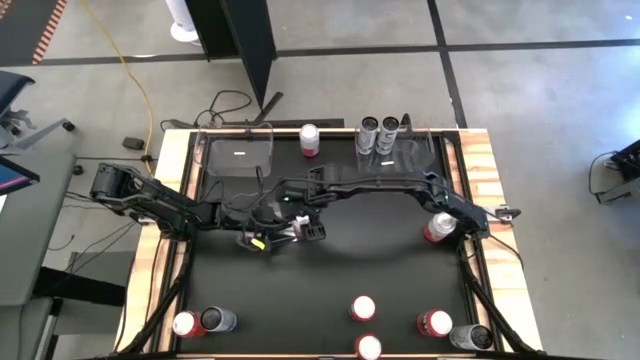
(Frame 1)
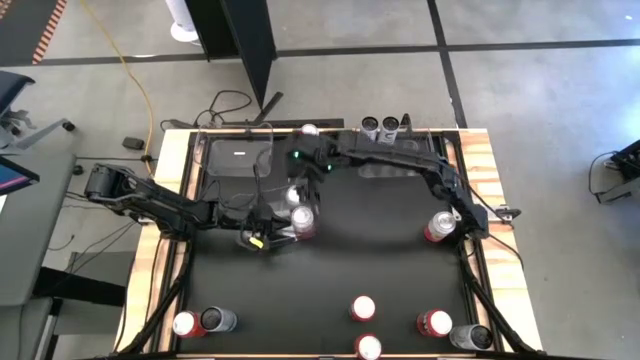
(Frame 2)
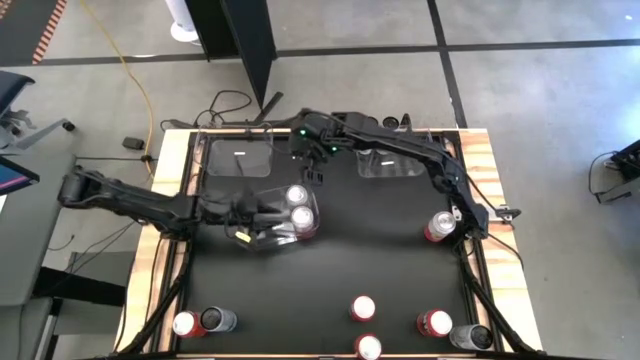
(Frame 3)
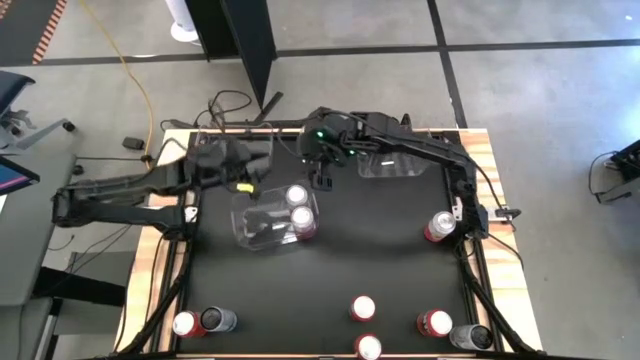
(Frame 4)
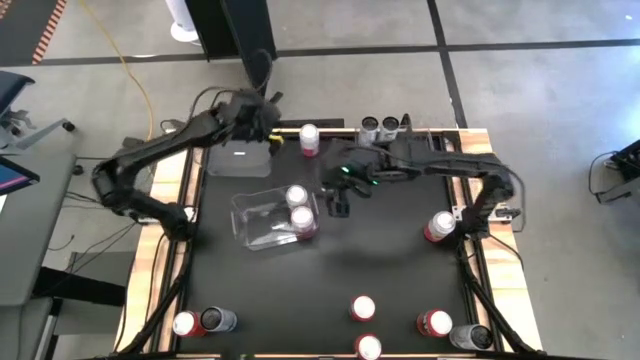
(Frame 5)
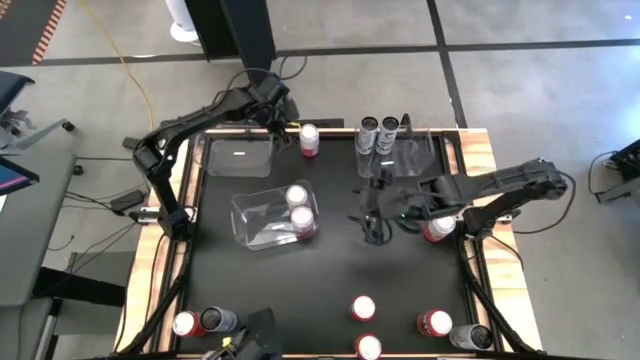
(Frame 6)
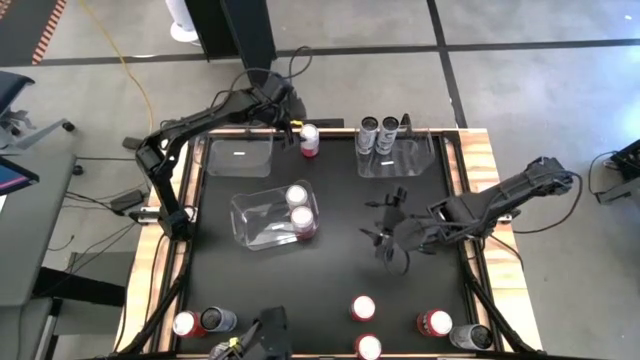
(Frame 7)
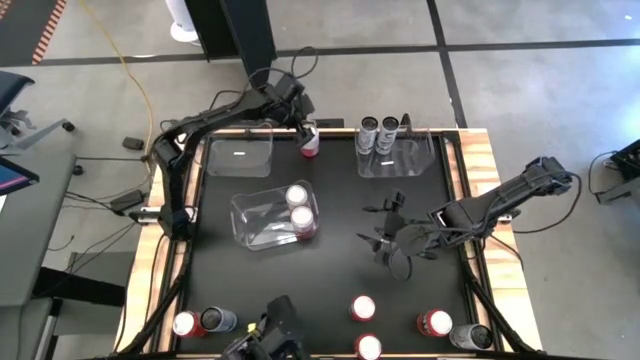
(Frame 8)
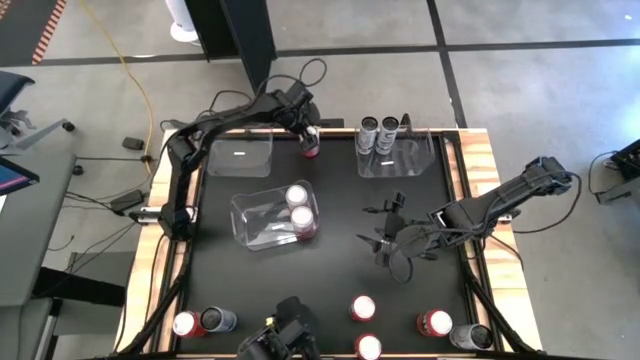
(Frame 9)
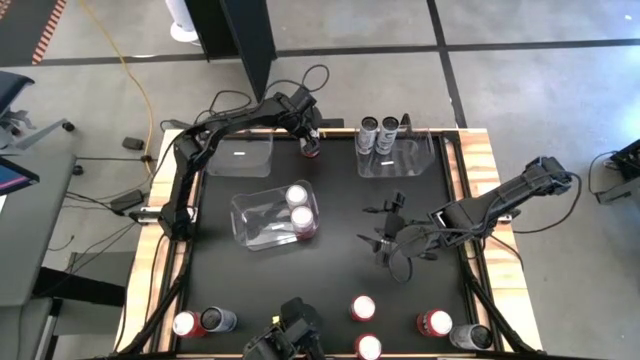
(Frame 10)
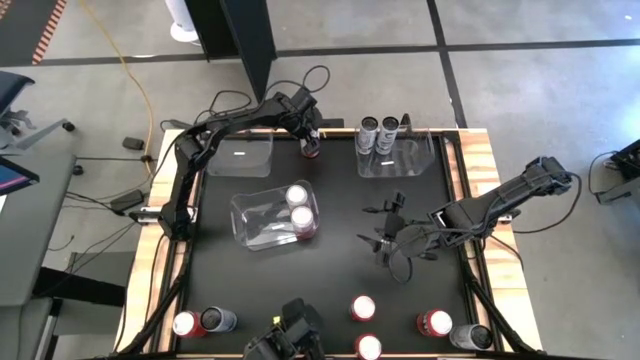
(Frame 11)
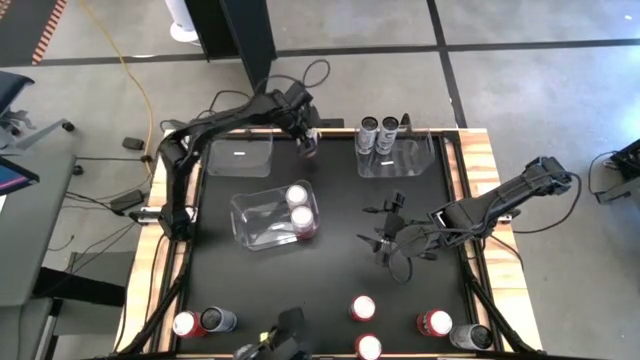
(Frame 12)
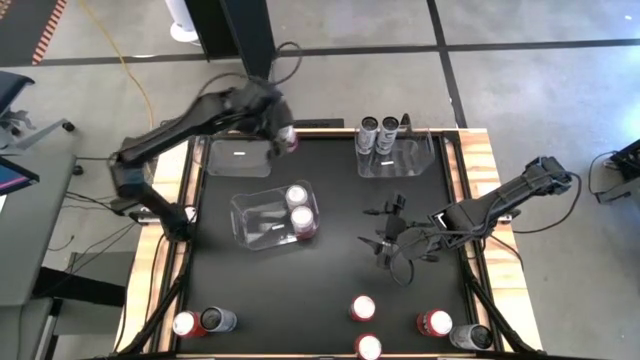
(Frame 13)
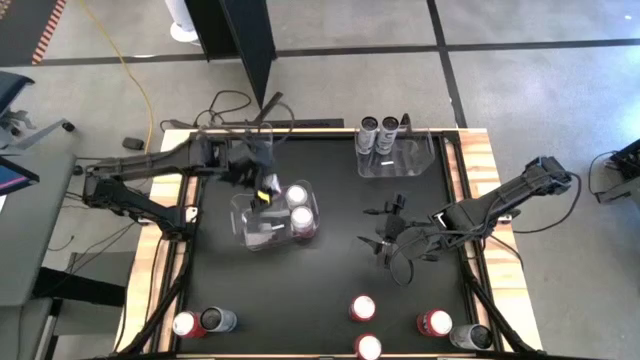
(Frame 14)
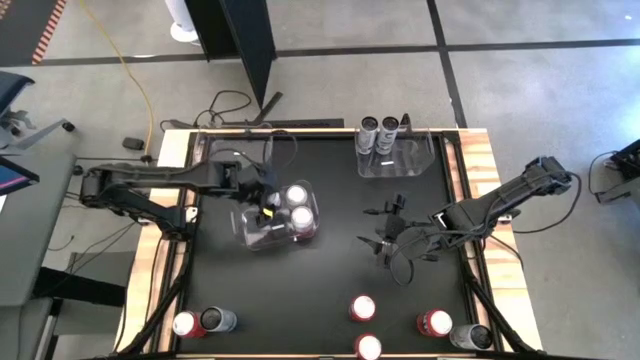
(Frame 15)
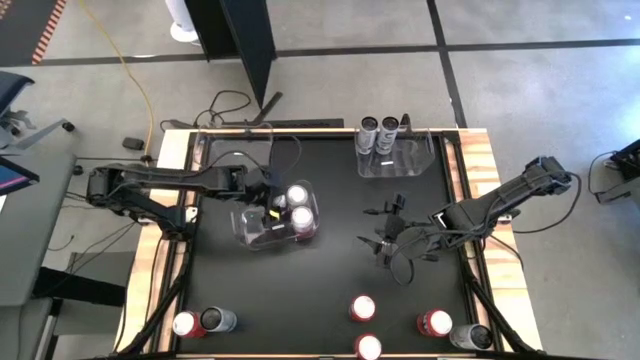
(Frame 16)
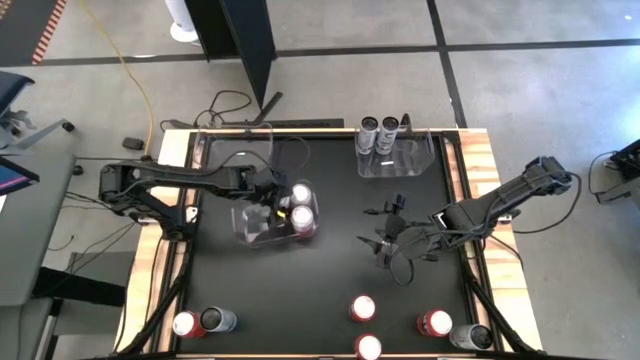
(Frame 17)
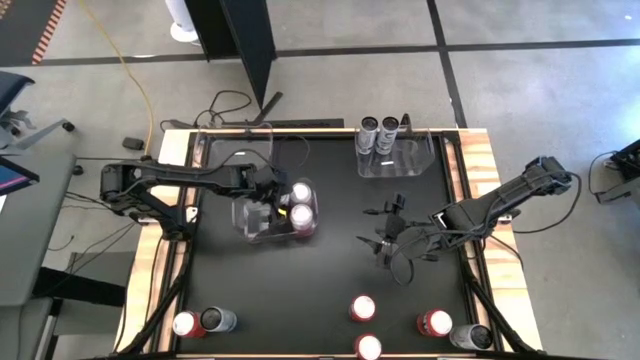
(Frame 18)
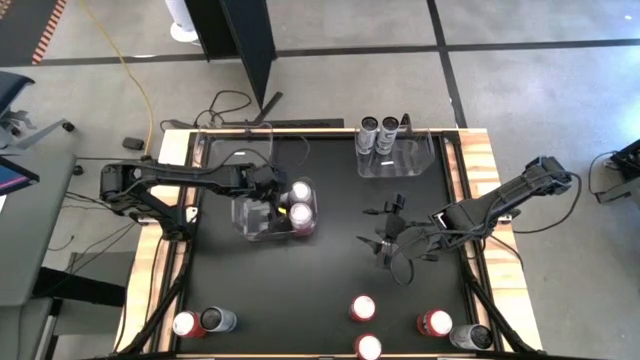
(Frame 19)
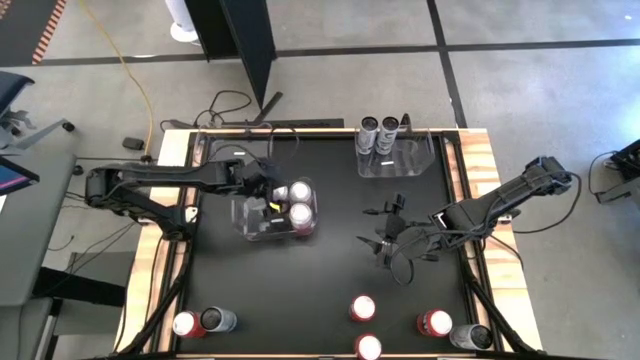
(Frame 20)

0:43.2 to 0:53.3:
Task: Sort soda cans
Put the top pink-white soda can into the bottom transparent bin

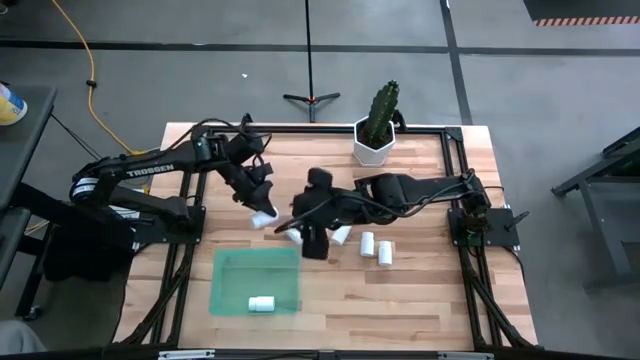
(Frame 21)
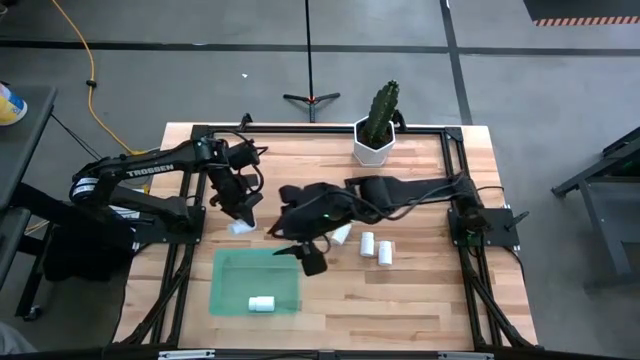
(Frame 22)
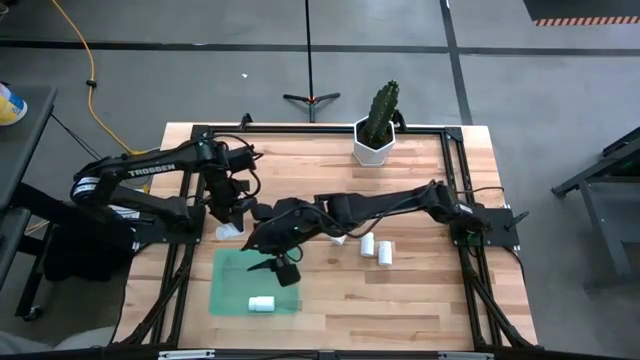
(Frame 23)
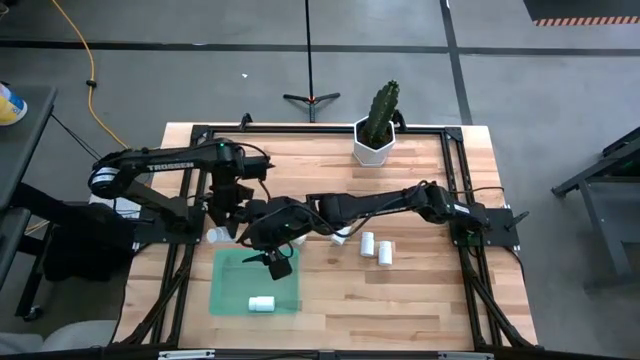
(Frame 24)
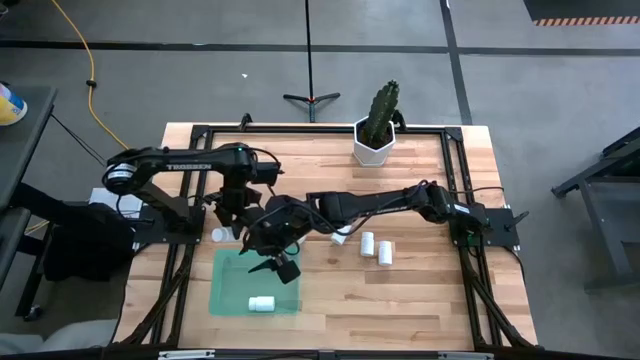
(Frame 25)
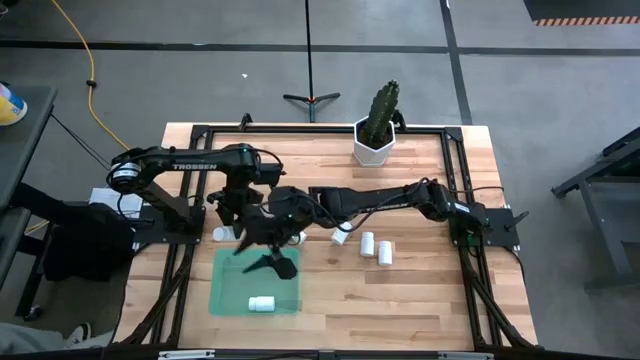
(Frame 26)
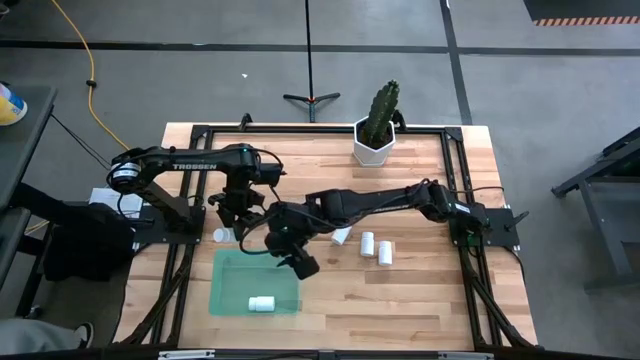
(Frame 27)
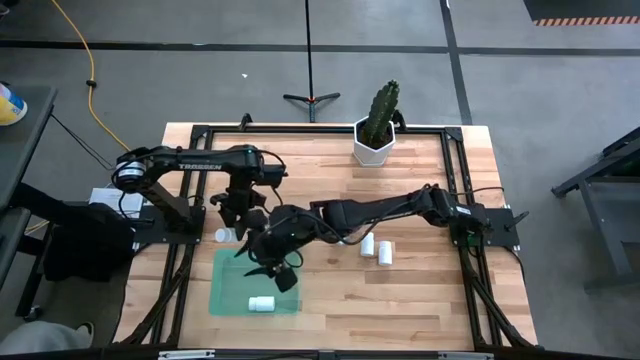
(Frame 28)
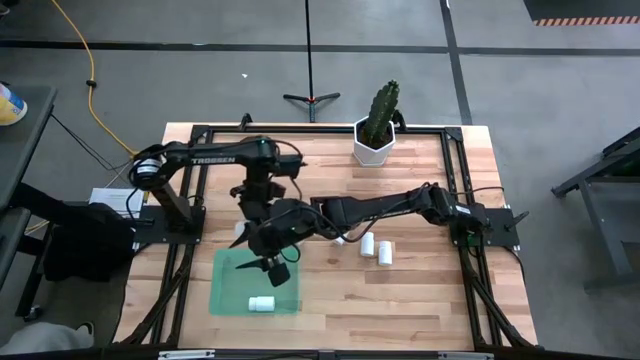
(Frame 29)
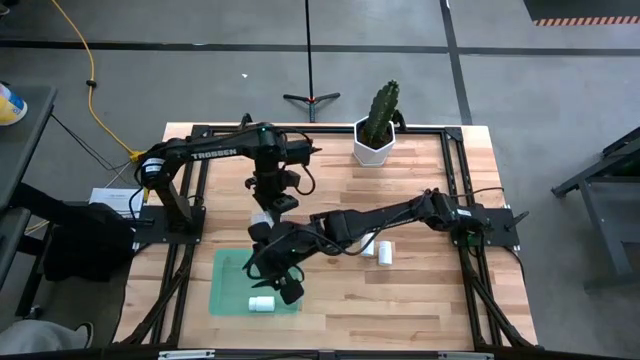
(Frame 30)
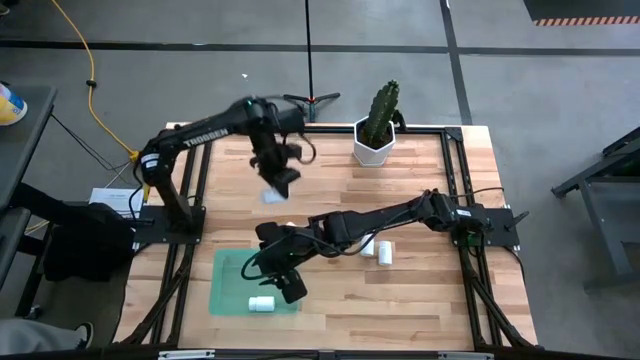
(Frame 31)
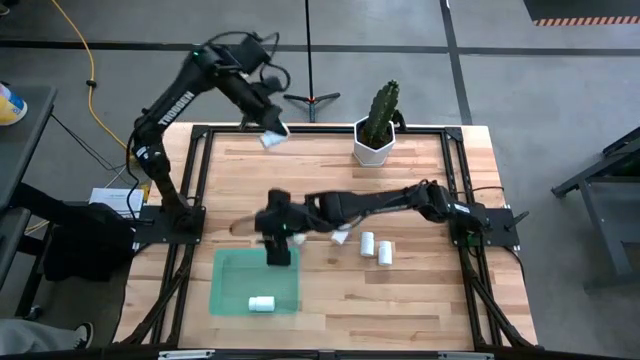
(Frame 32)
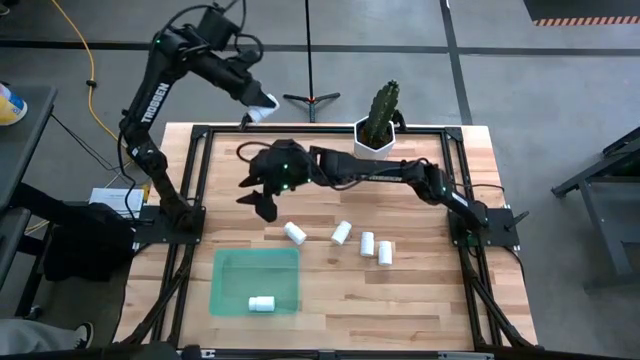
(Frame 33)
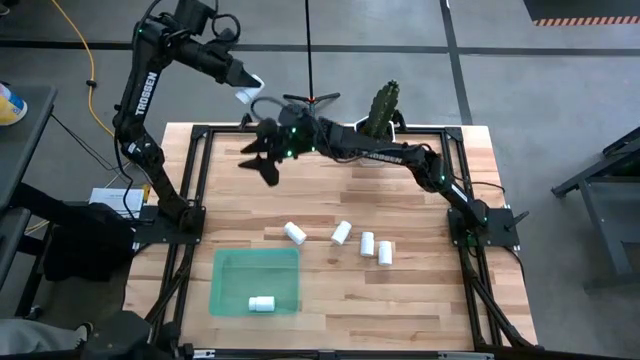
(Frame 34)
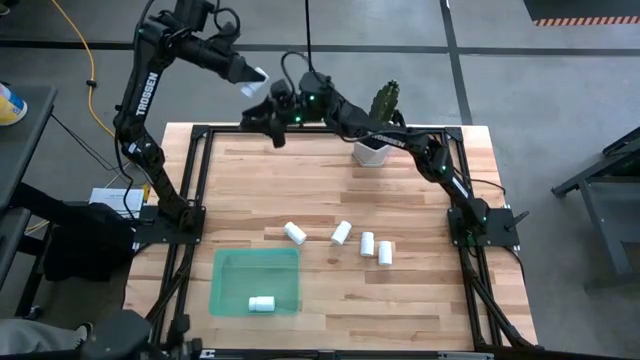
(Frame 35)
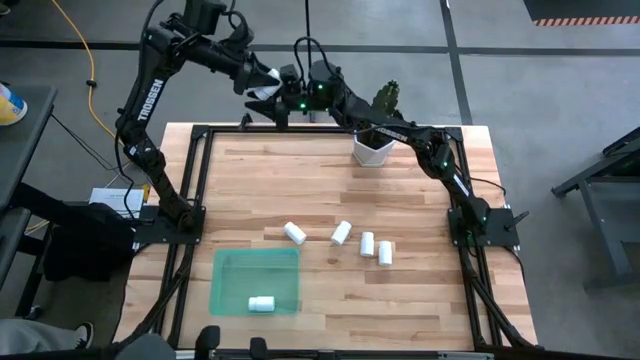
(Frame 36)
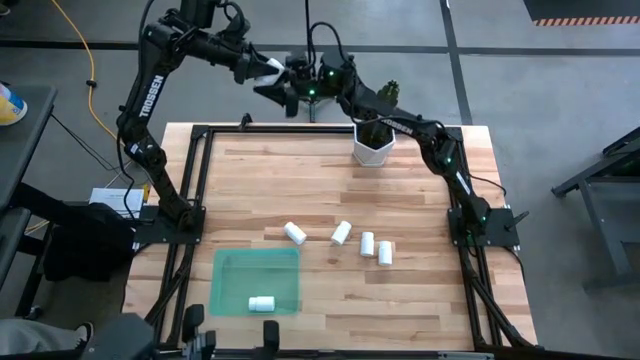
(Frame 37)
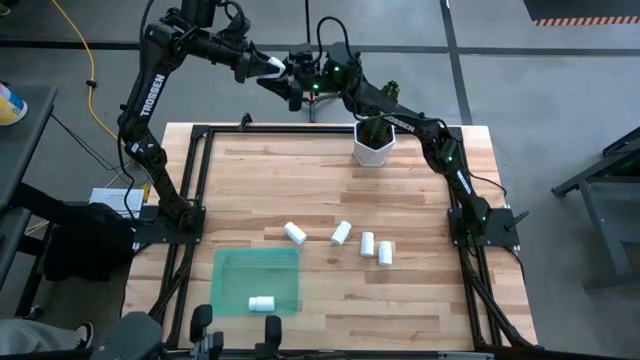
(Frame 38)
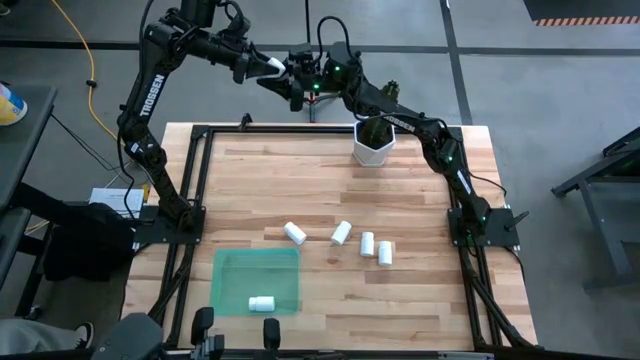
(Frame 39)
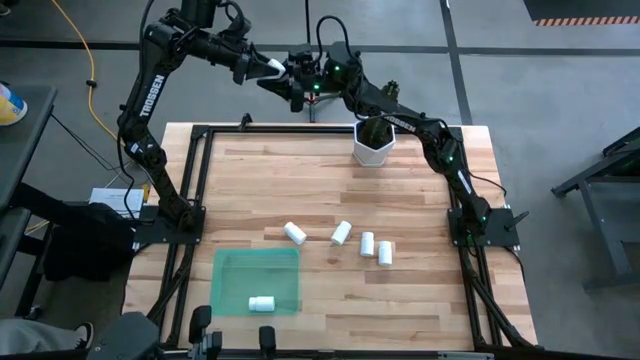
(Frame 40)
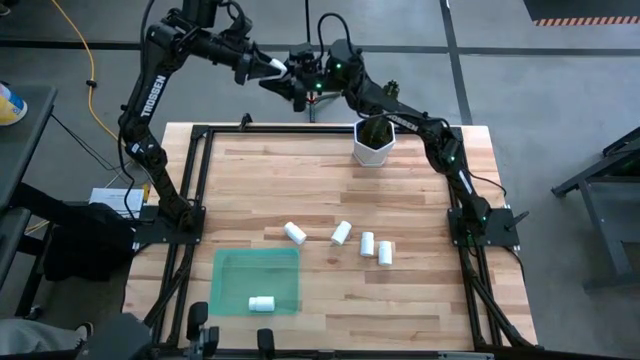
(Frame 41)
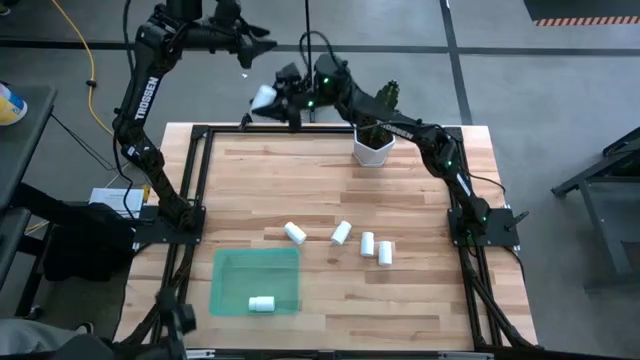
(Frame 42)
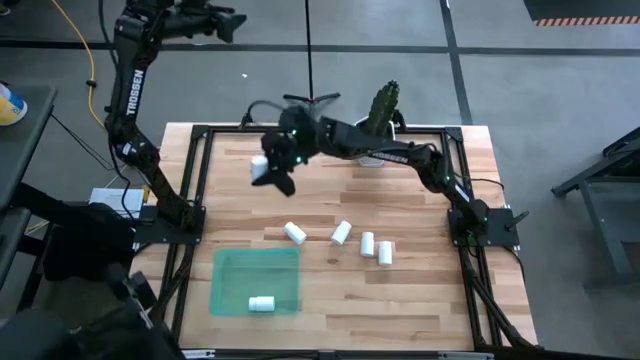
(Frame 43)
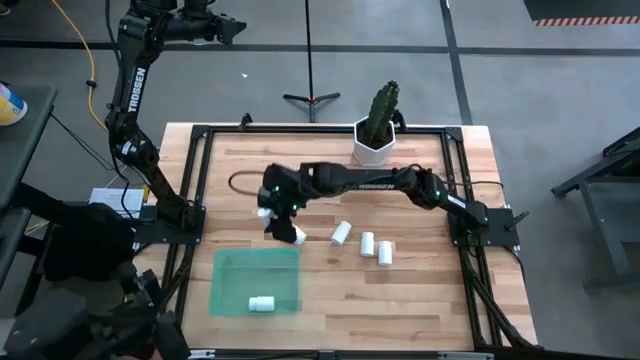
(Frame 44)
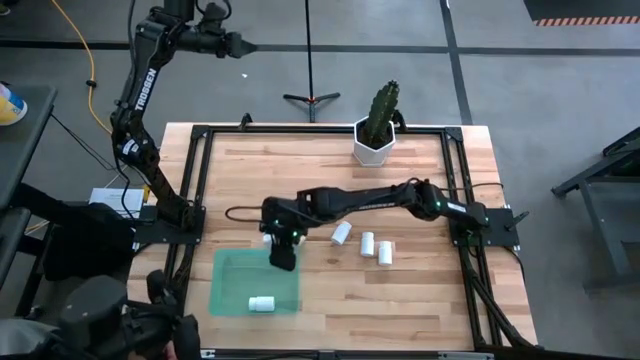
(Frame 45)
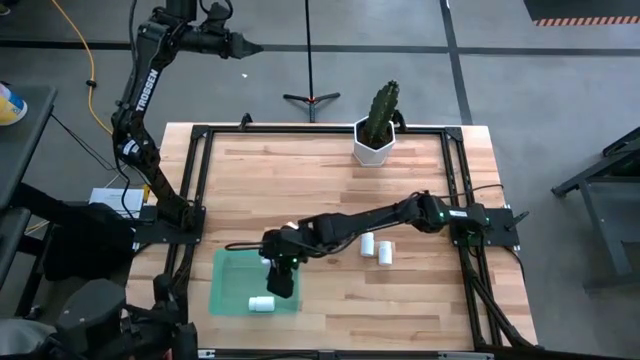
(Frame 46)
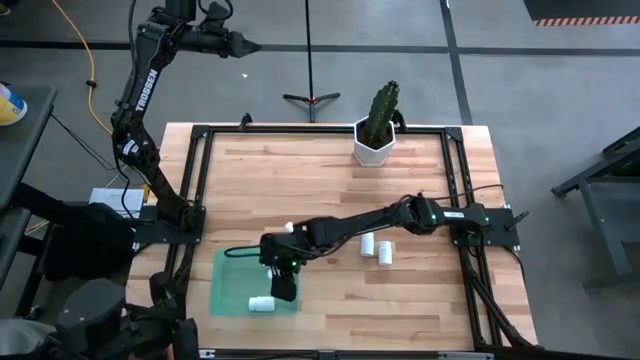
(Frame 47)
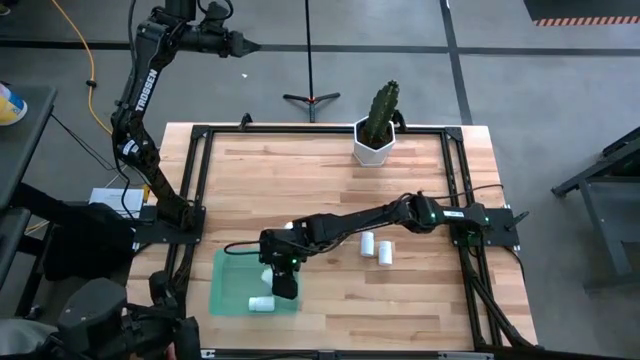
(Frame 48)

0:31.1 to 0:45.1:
Task: Pick and place pill bottles into a basket
Put the white pill bottle into the green bin
